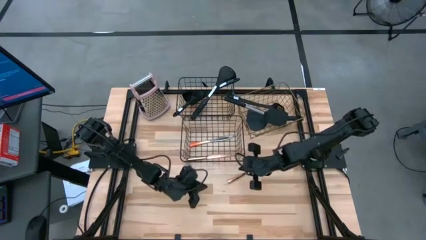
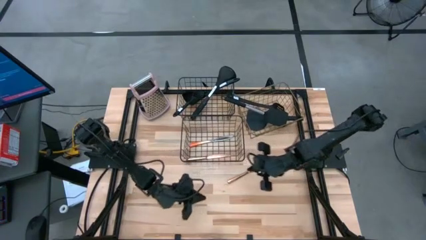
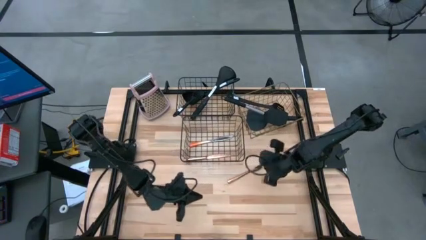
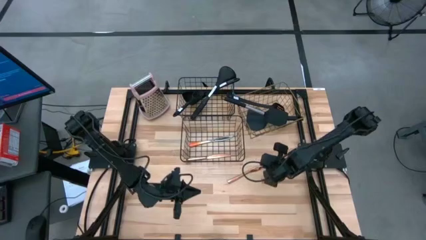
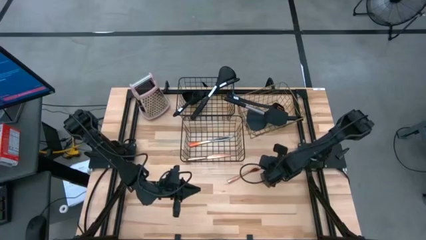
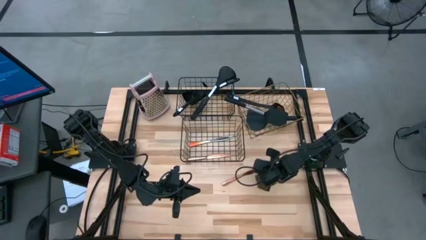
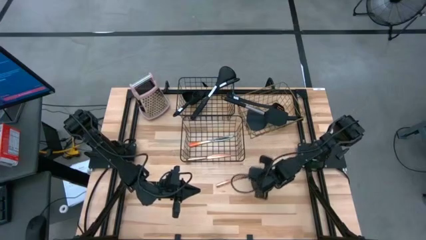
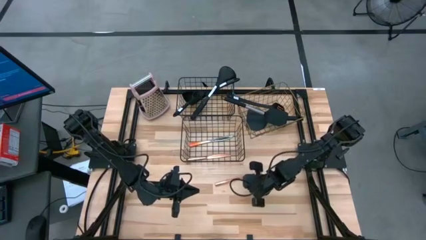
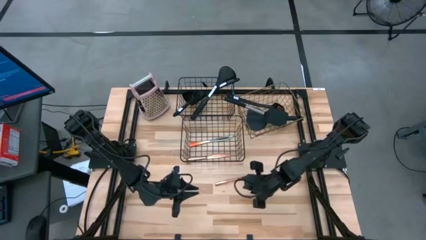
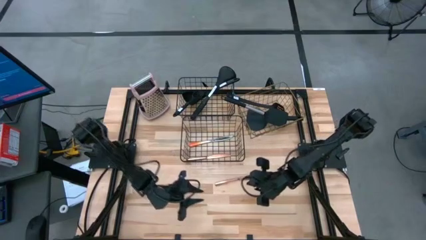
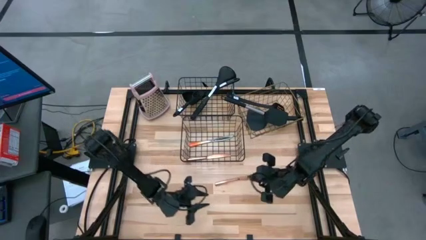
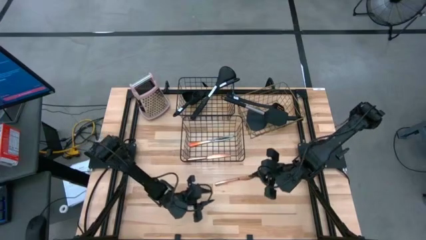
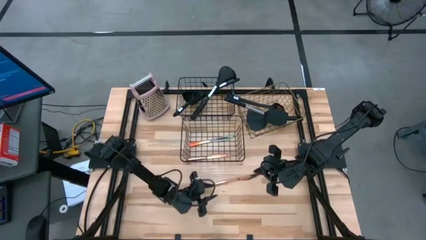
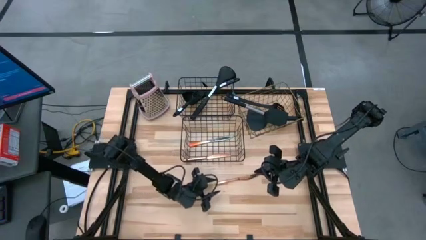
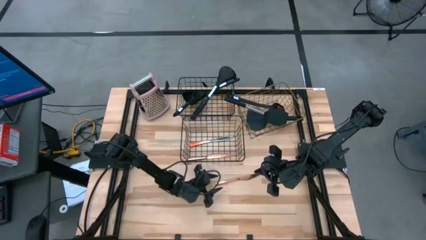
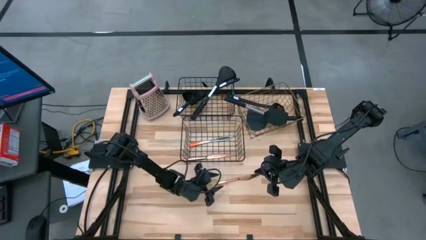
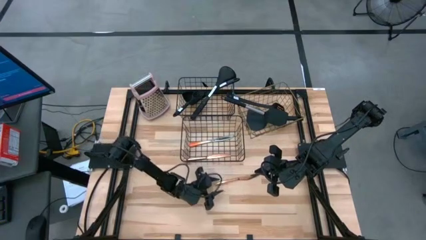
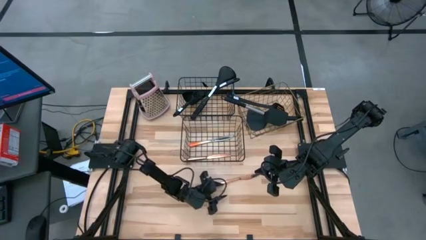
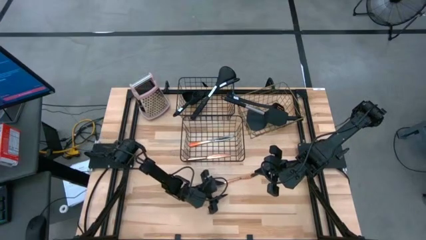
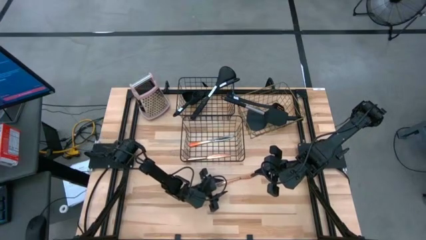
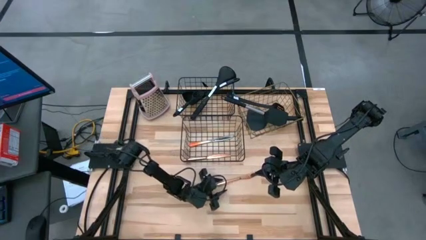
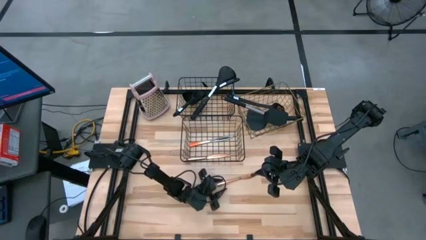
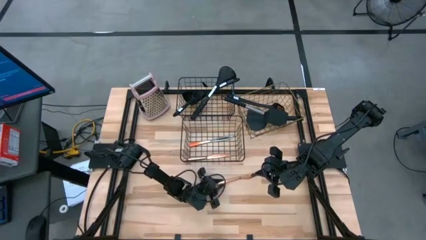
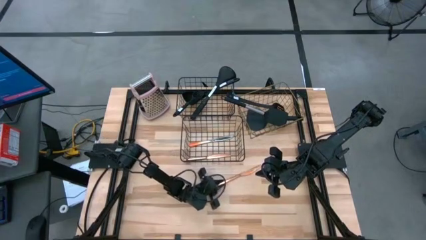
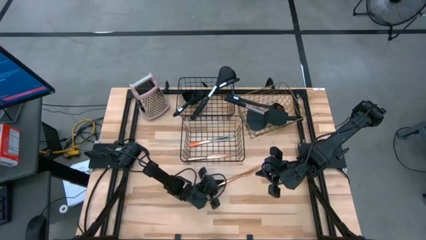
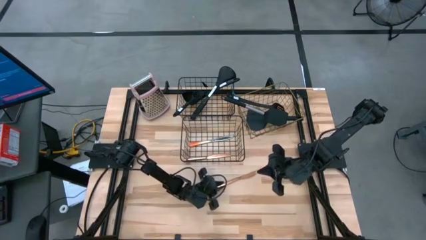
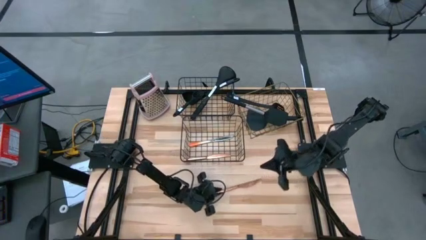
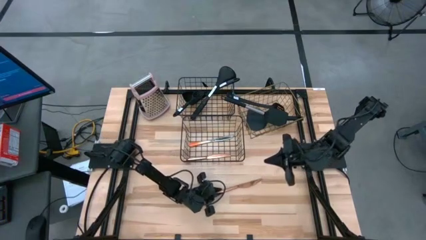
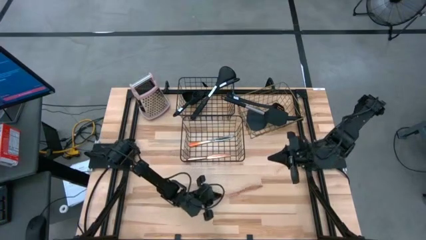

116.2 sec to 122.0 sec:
Task: Pick & Place Kitchen Items
Put the table knife into the bottom wire basket

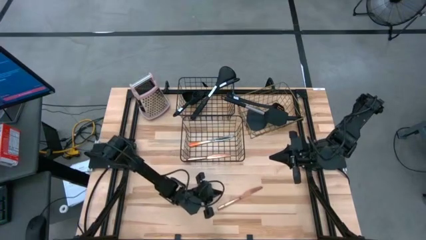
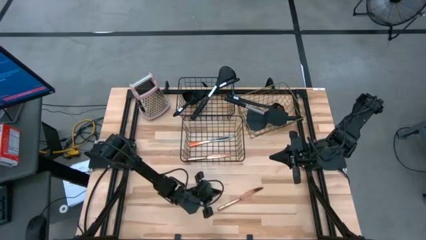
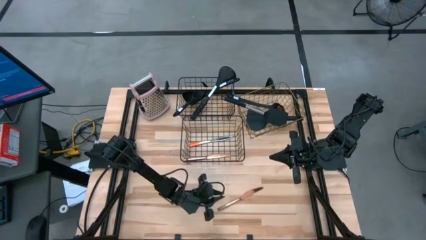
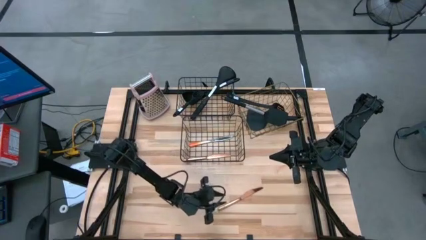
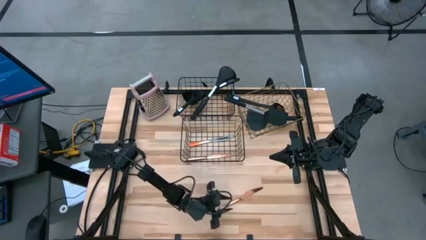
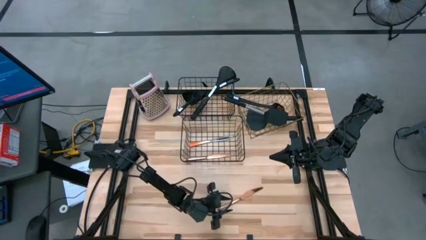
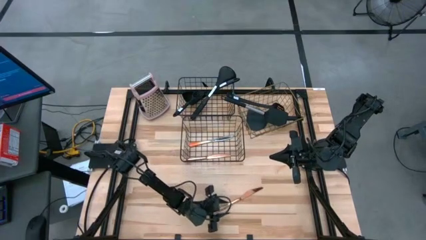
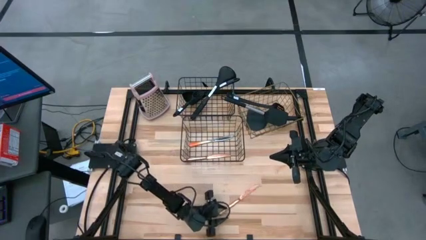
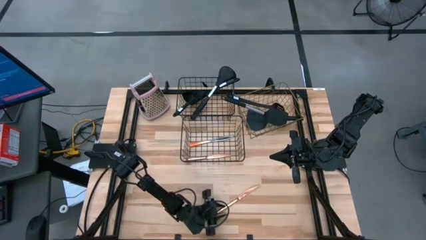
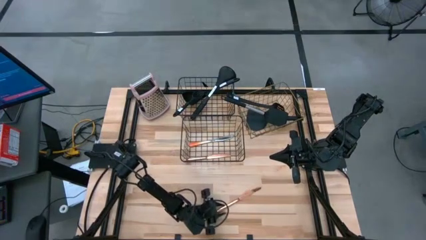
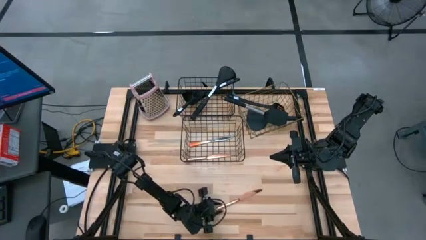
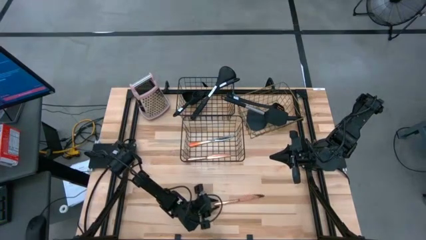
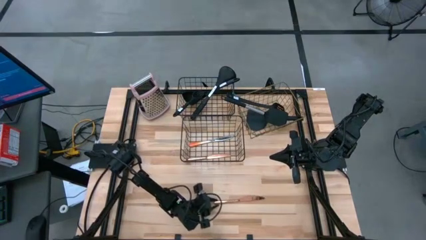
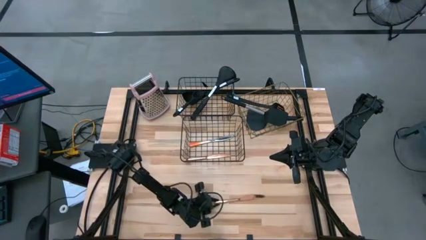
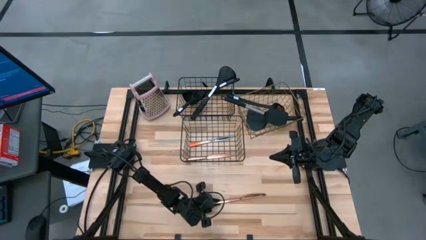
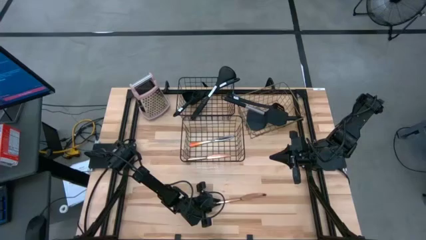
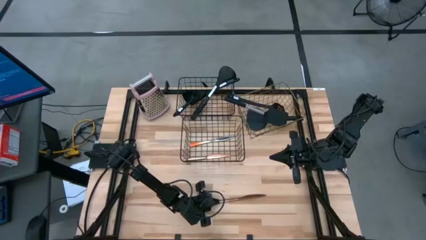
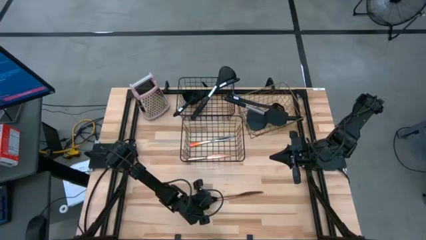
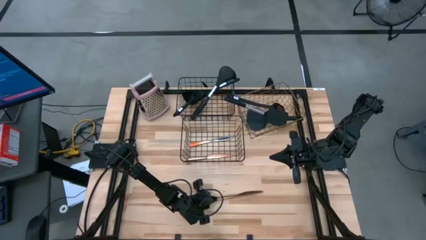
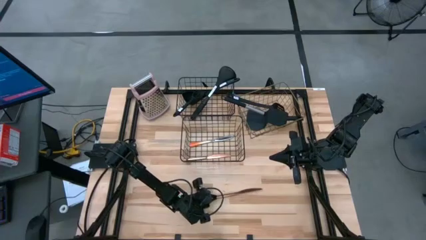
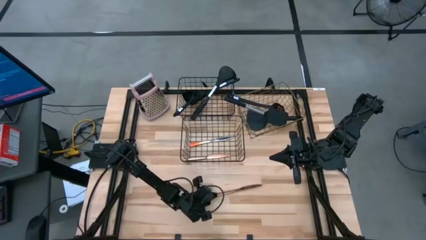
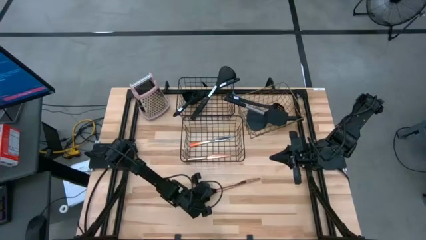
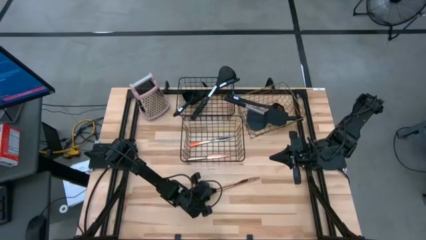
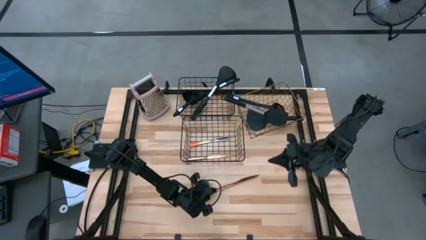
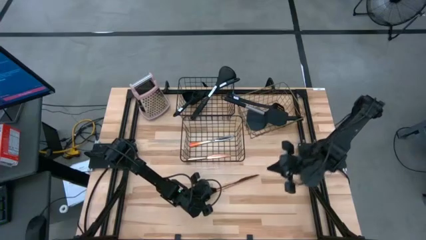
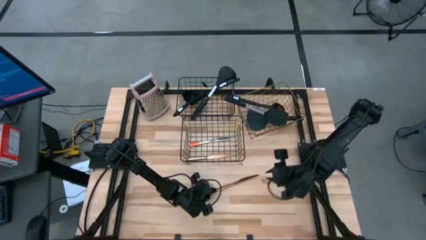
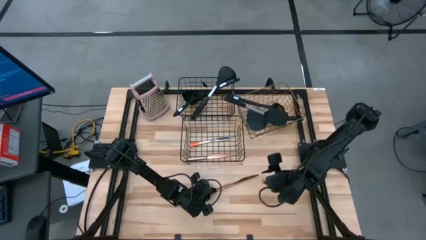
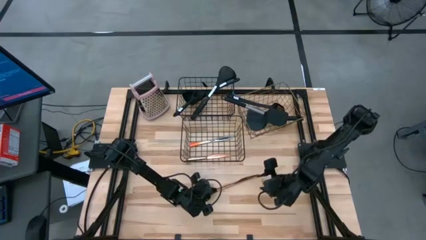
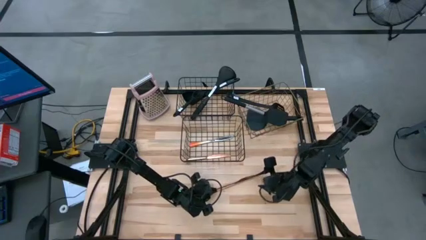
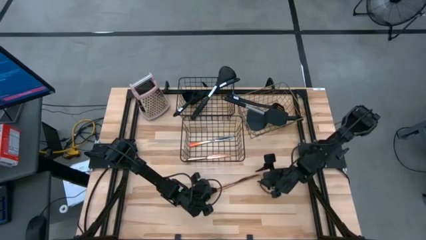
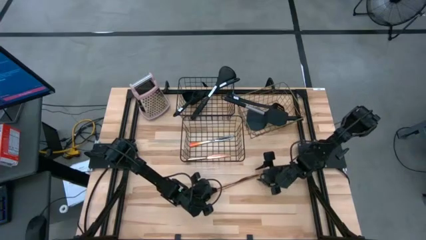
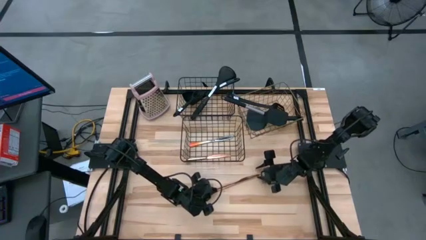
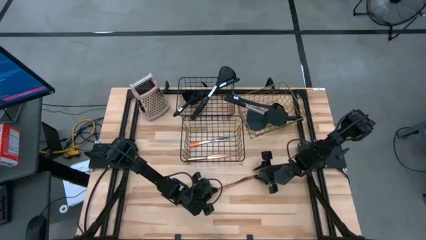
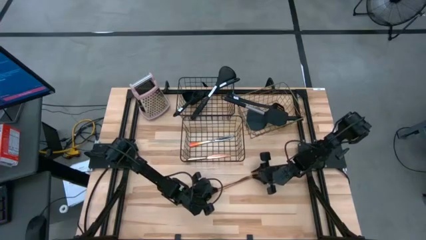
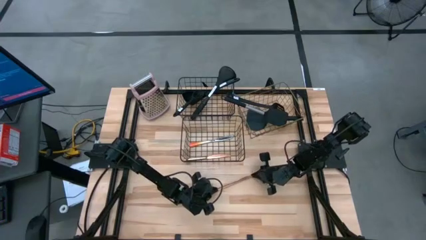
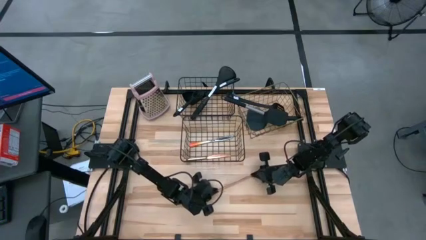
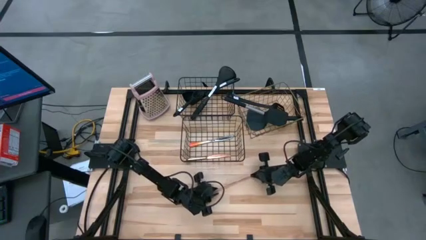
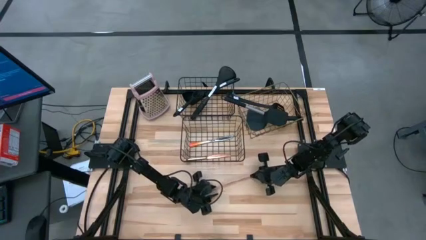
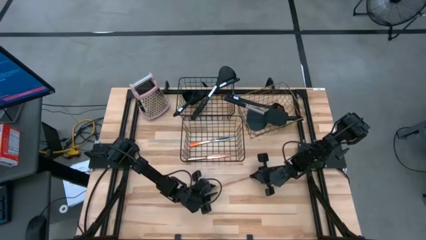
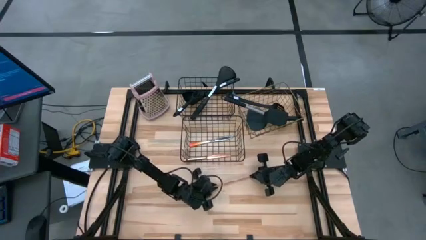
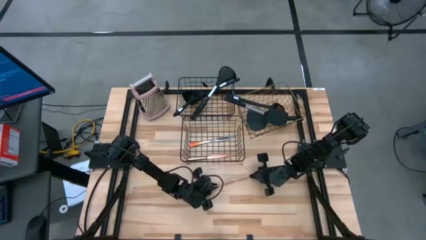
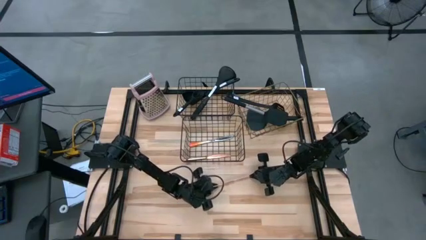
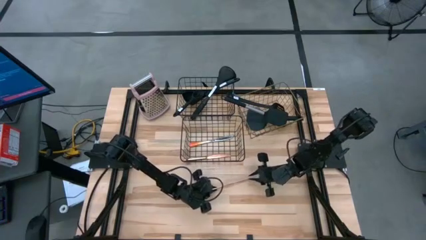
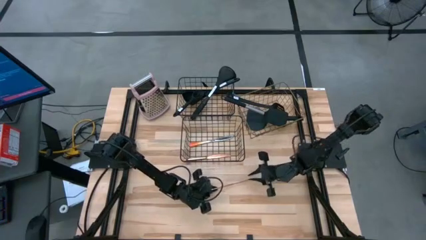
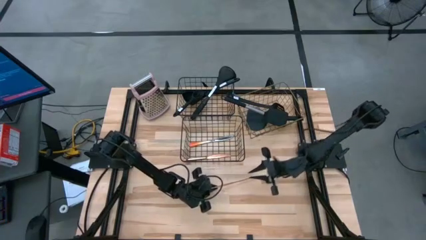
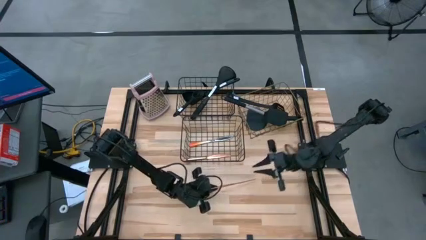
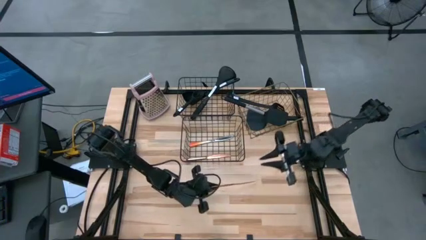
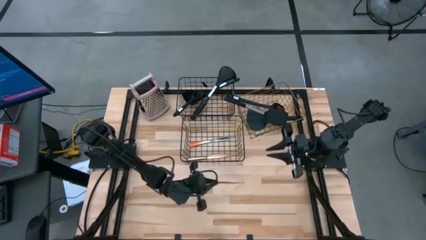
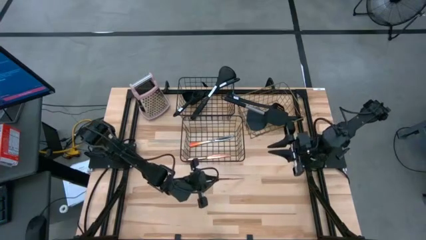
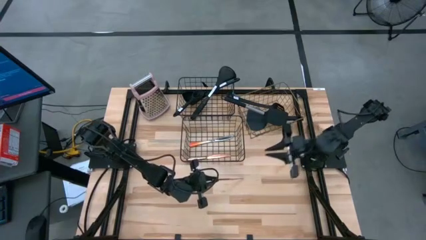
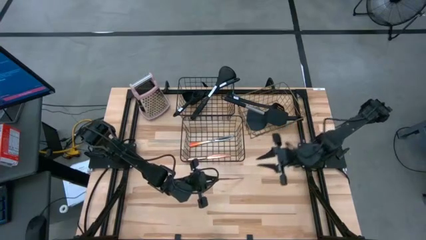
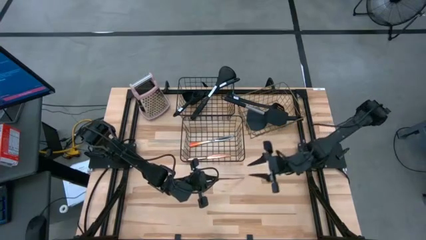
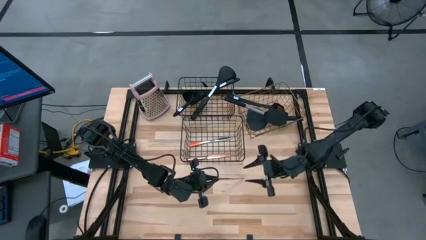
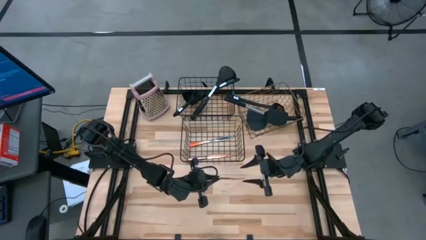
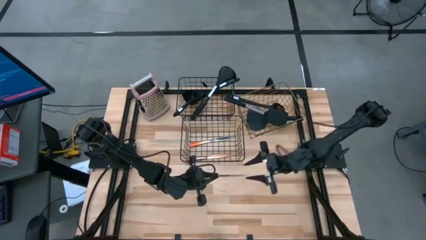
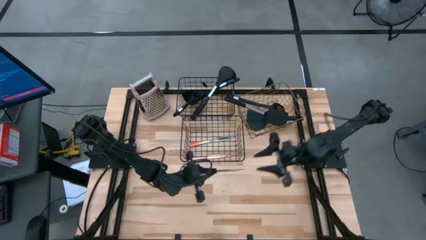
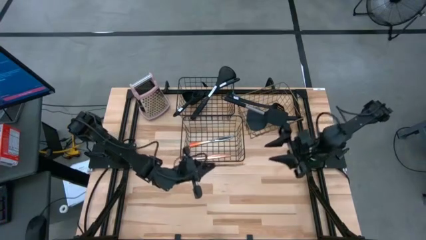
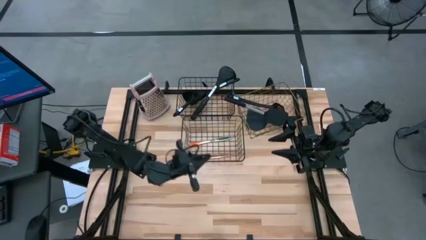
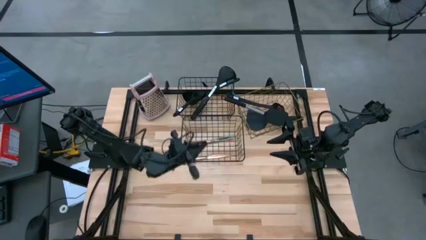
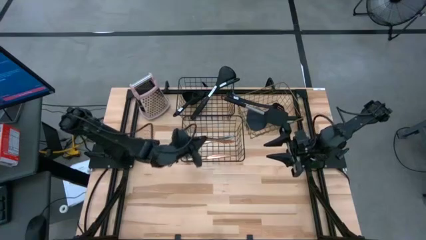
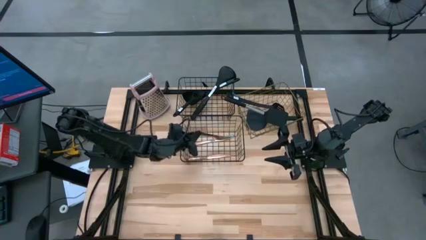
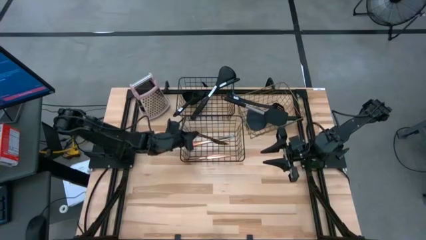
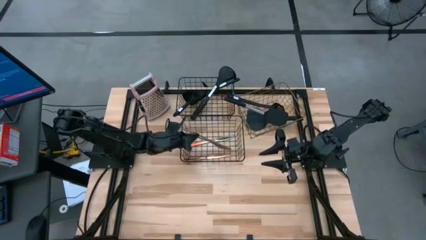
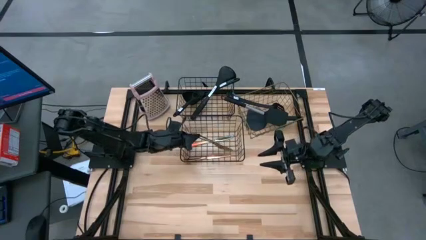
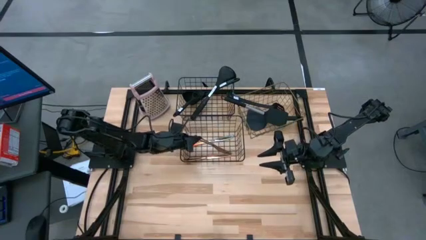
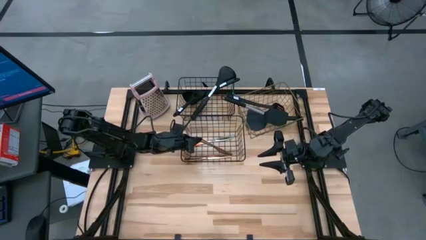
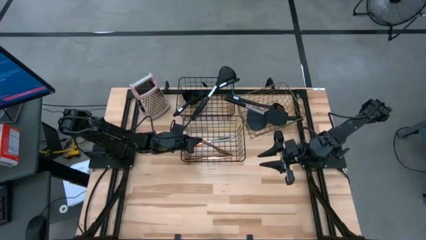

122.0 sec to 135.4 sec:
Put the table knife into the bottom wire basket
